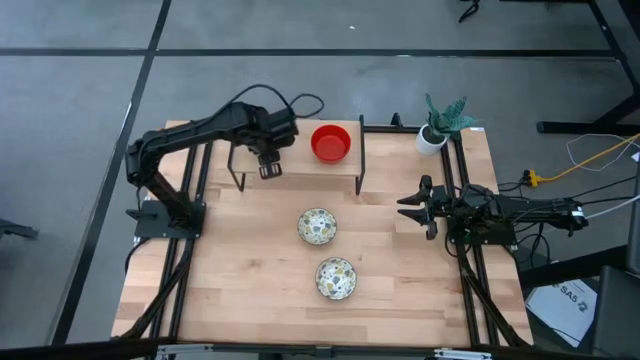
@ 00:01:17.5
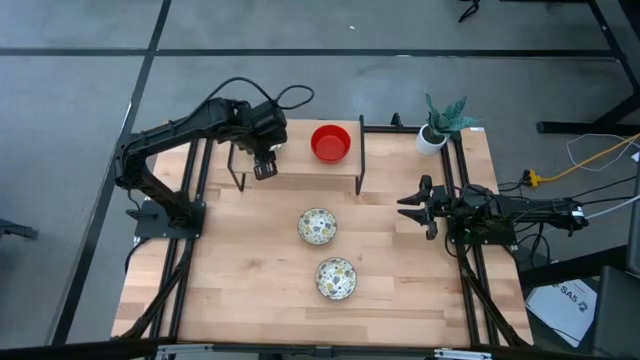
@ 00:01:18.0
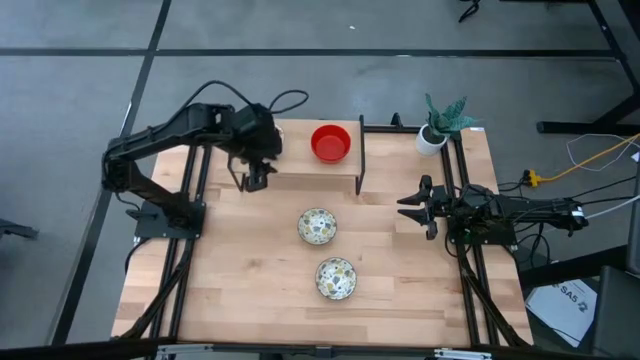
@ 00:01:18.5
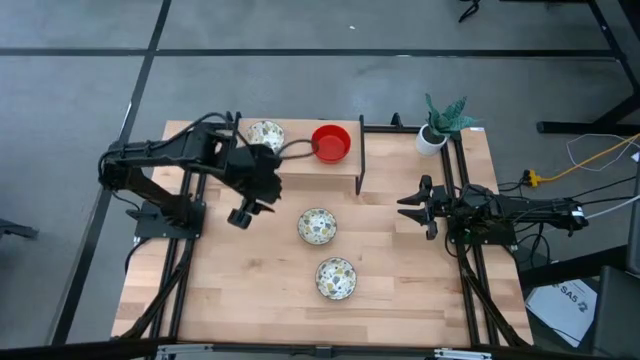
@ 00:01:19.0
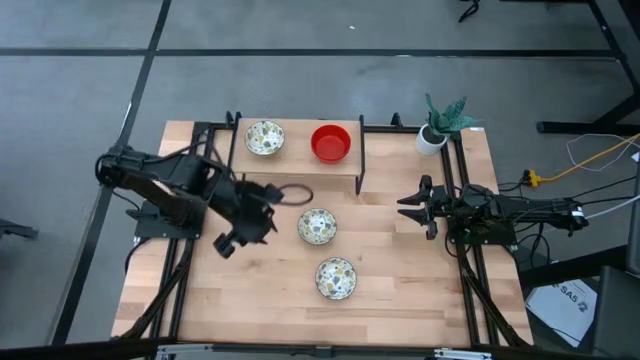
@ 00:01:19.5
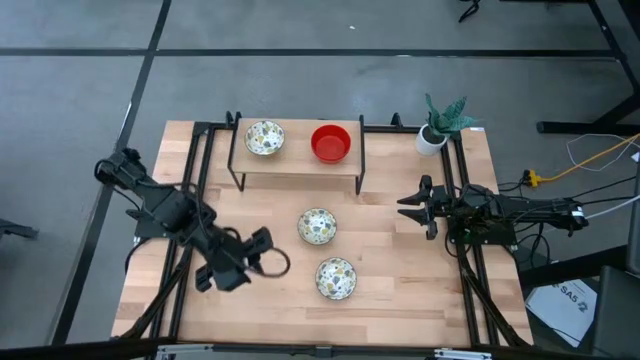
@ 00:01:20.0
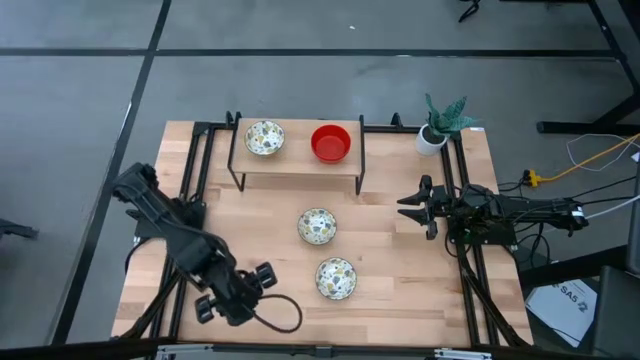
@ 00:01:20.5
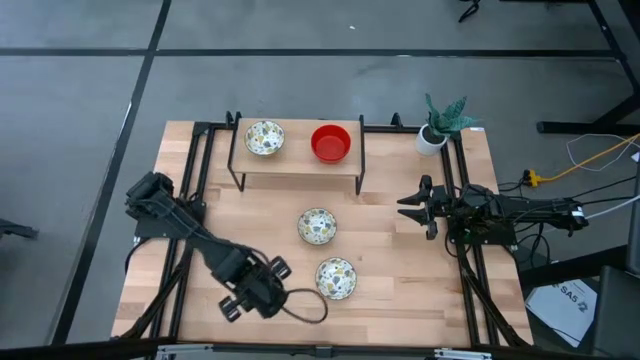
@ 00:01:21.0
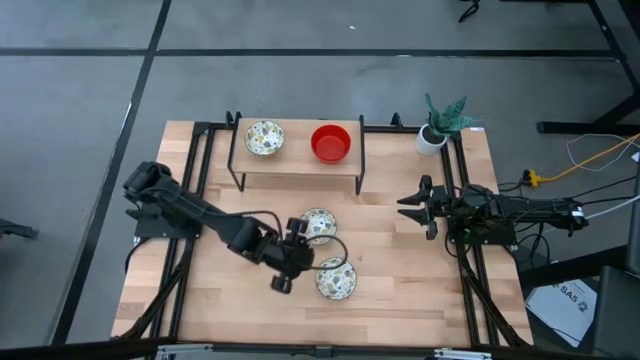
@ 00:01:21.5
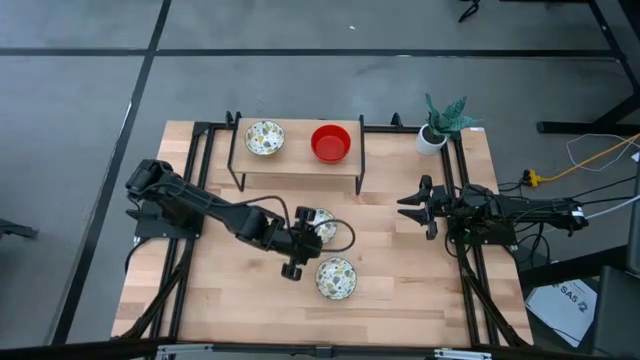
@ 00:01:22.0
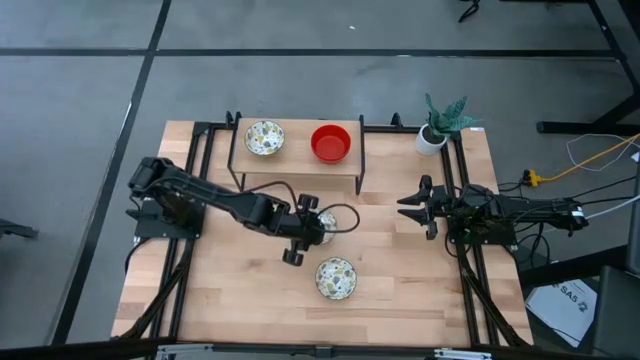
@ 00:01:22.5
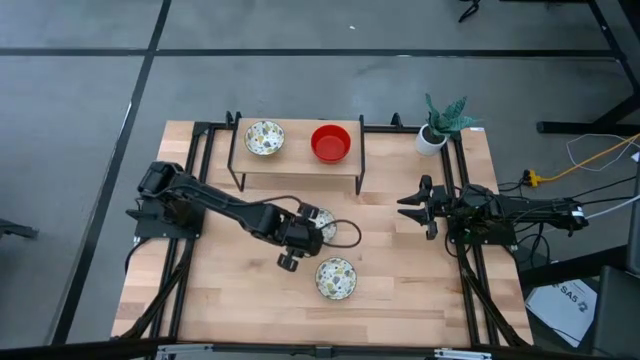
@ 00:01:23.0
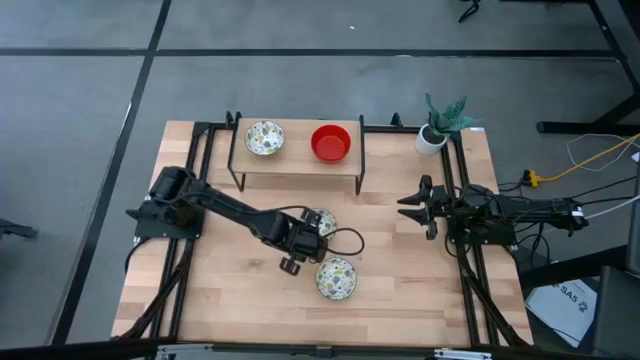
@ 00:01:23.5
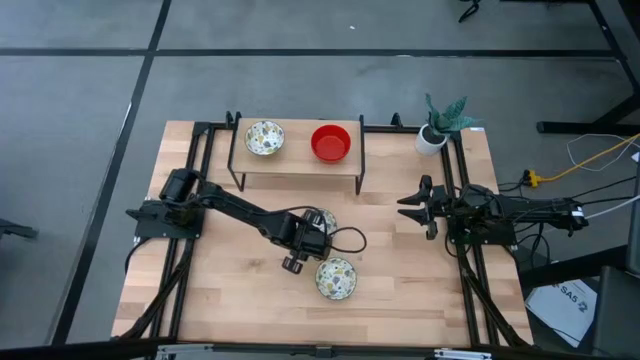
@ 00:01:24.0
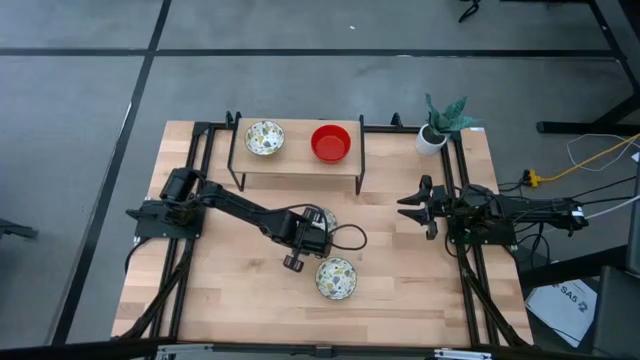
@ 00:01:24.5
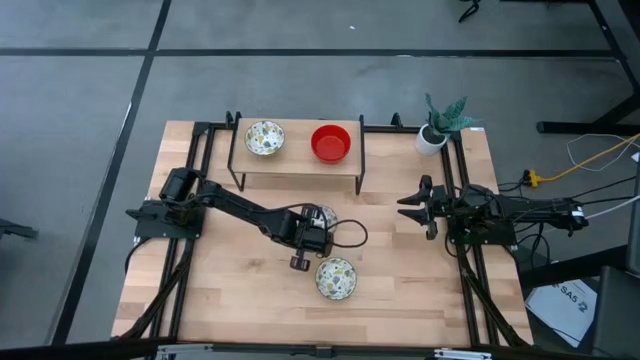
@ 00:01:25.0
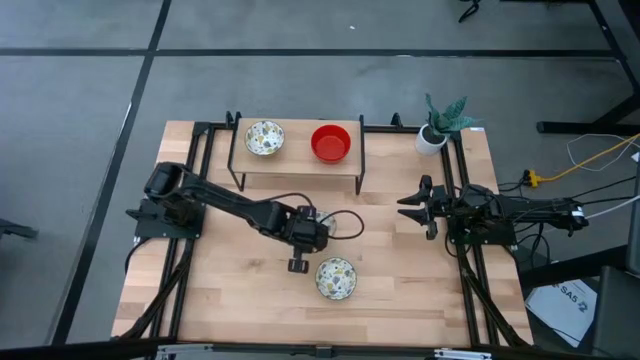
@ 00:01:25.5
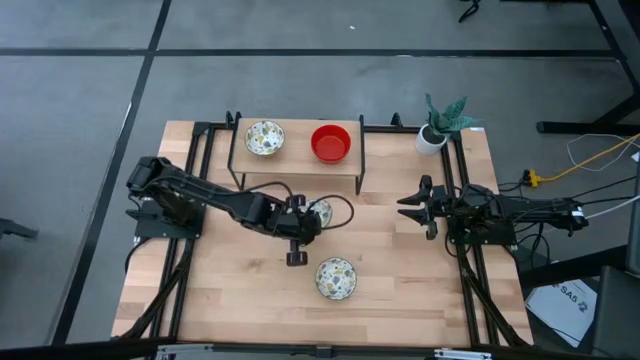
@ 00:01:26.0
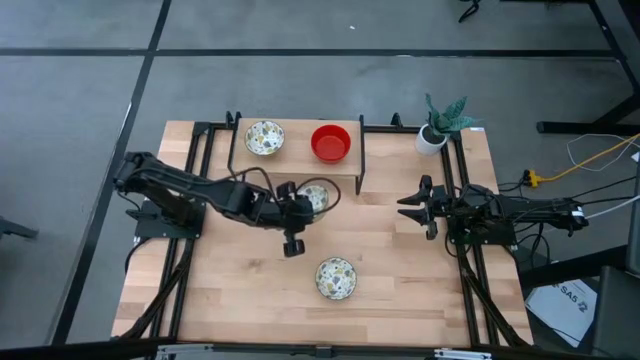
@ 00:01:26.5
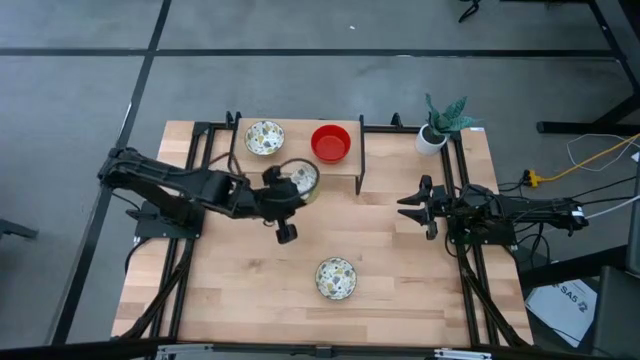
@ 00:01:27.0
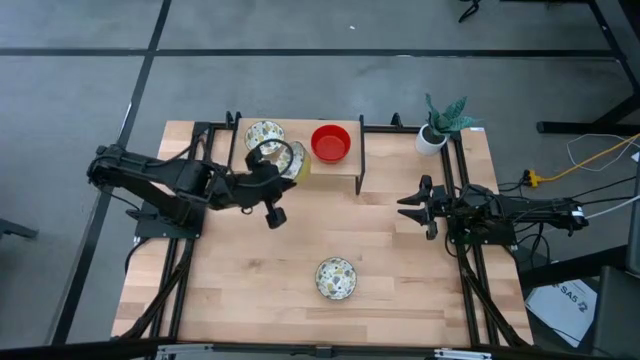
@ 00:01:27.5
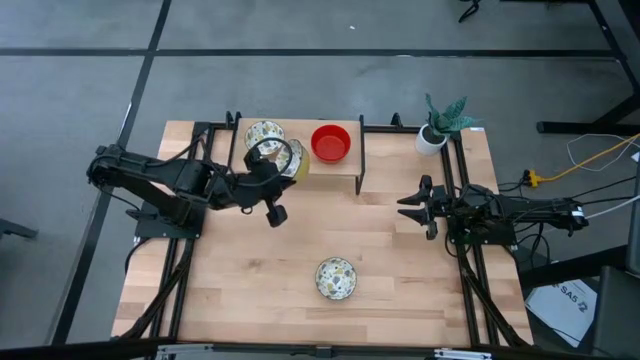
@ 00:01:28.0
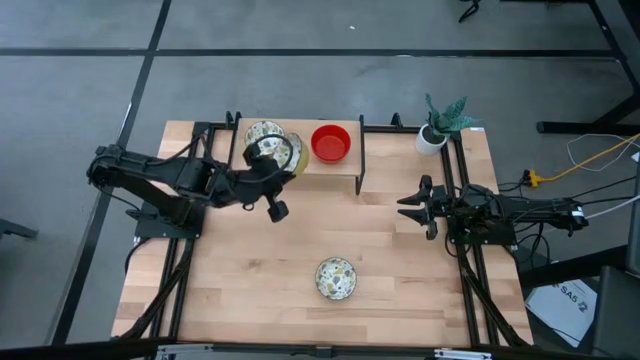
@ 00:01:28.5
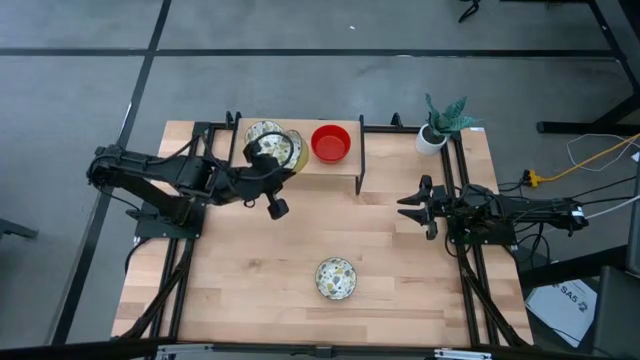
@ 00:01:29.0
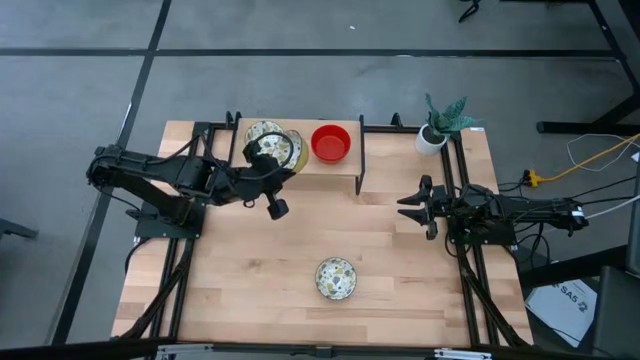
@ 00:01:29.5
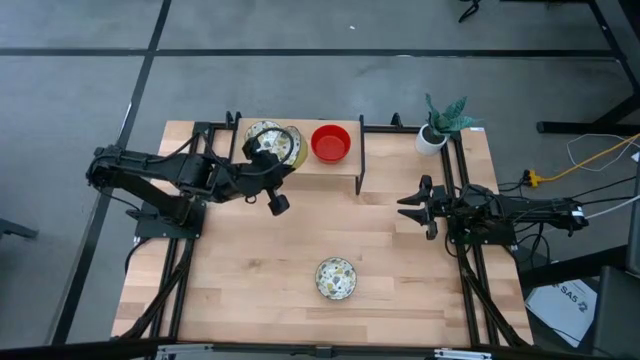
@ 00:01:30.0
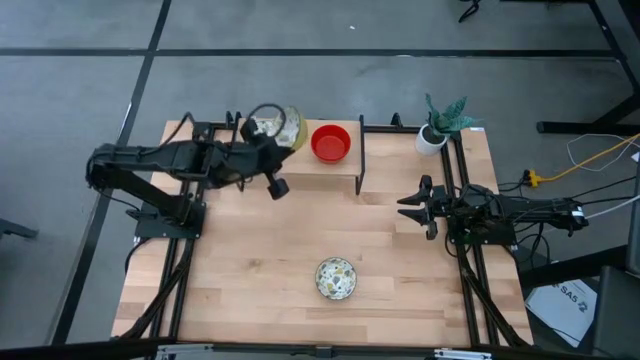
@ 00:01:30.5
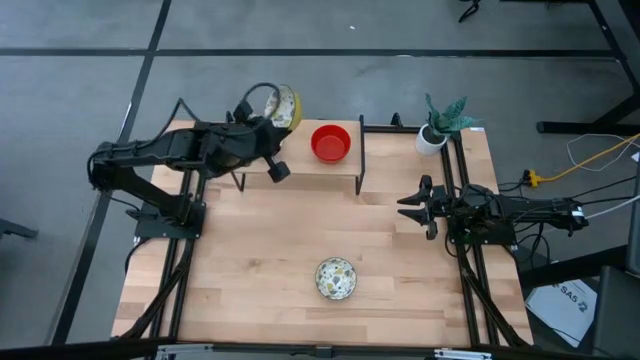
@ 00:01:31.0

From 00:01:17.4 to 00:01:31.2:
Task: Pick & Place Mini bowls
Stack the top white patterned bowl on the white patterned bowl on the shelf

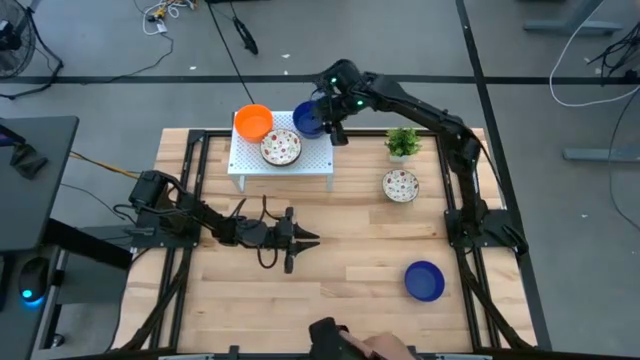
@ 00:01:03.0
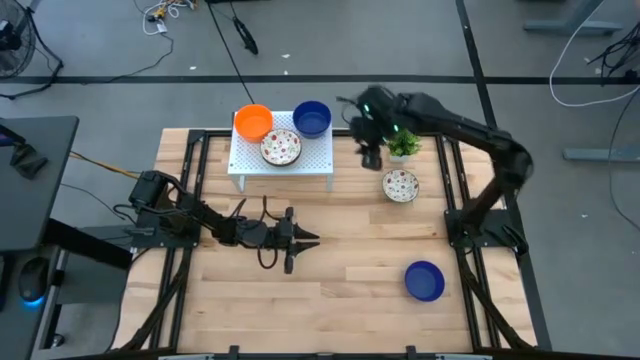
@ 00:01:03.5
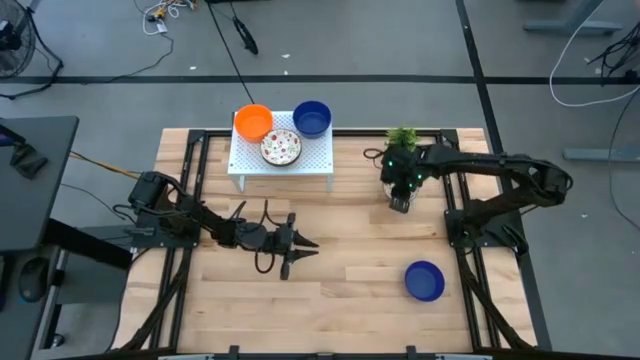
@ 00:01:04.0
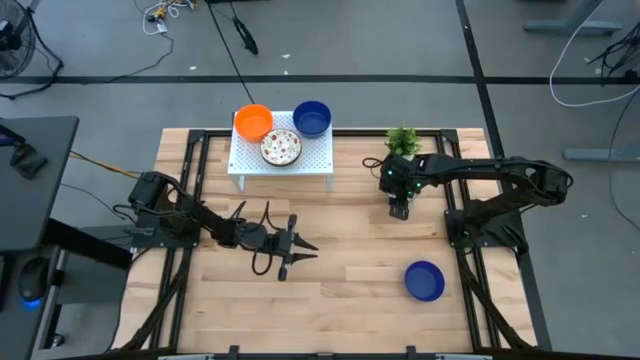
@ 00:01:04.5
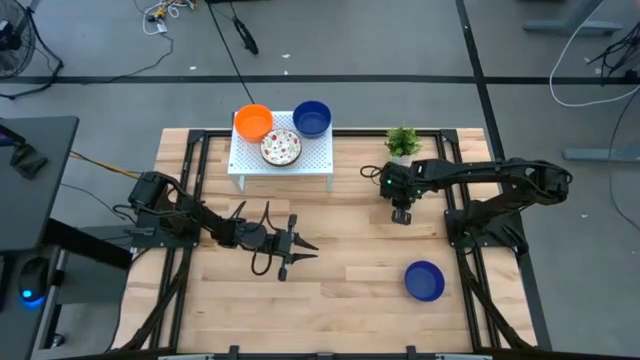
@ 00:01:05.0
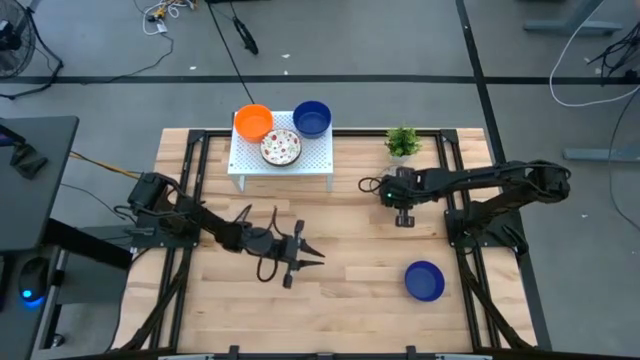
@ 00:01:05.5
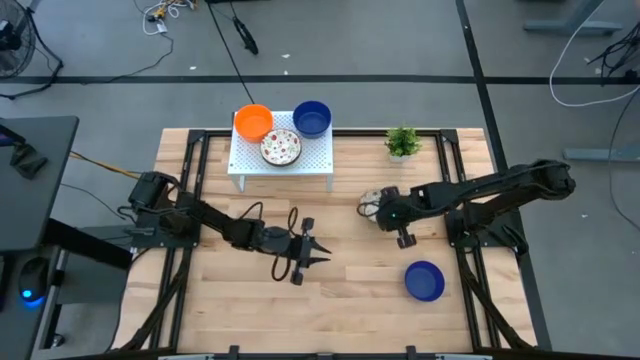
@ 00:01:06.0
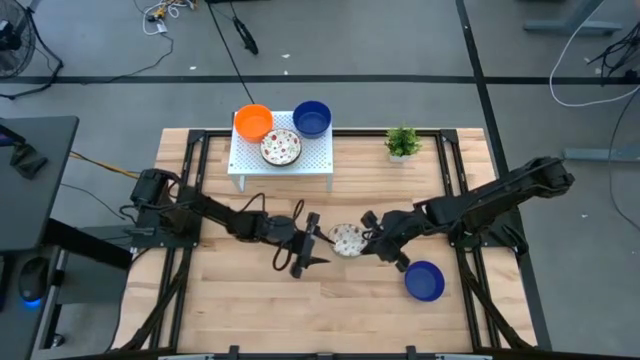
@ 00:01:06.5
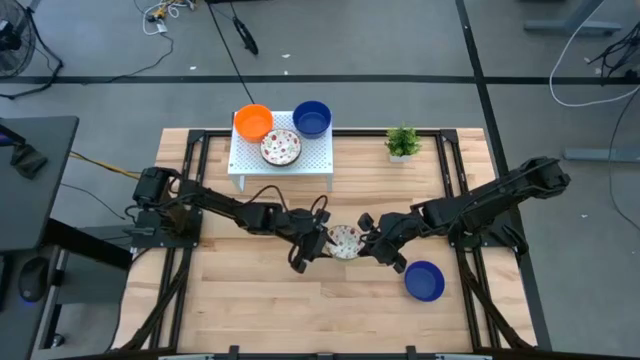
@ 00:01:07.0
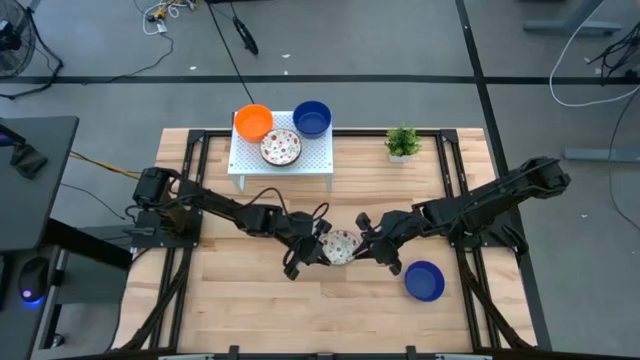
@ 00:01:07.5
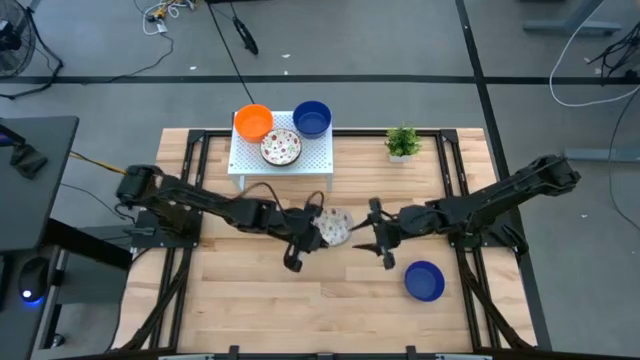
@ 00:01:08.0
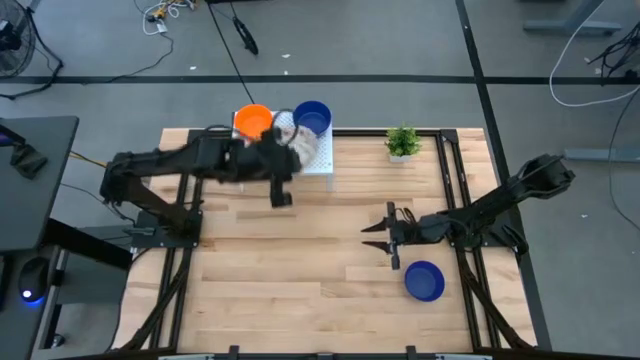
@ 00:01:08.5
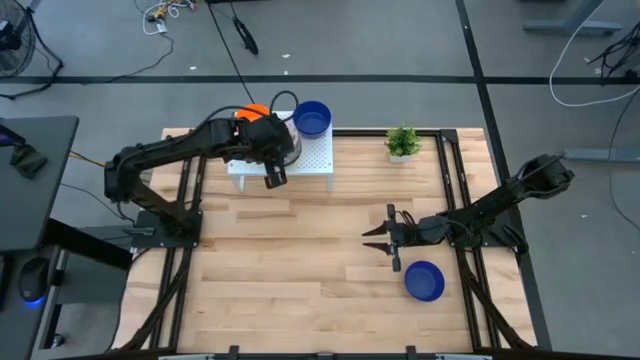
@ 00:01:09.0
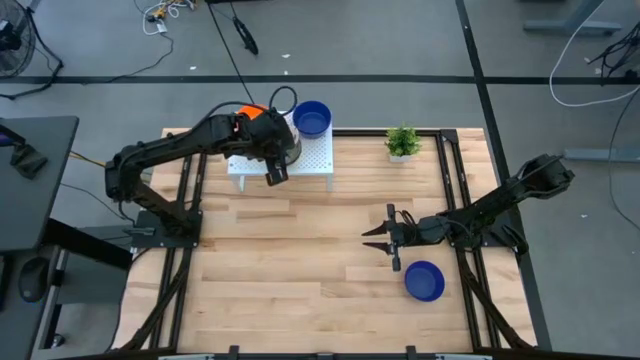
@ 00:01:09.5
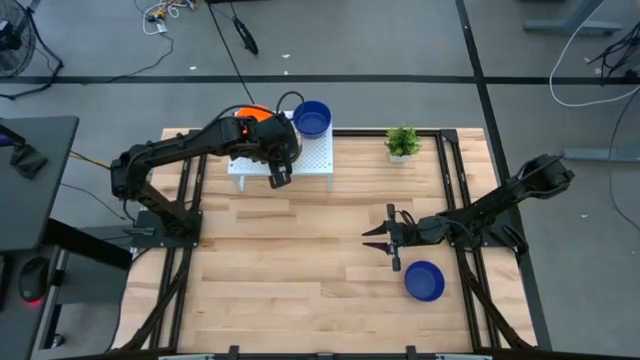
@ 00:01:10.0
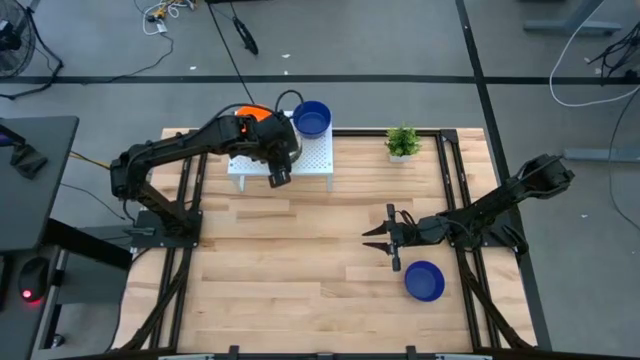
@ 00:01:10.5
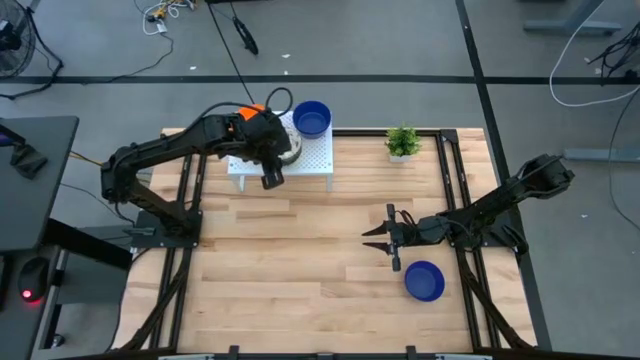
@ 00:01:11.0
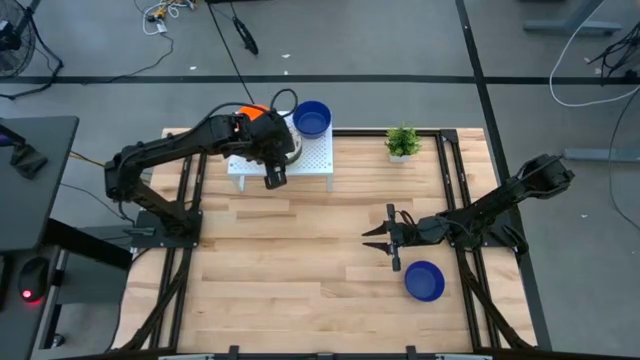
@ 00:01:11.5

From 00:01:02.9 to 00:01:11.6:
Task: Pick & Place Mini bowls
Stack the red pattern bowl on top of the red pattern bowl on the shelf
